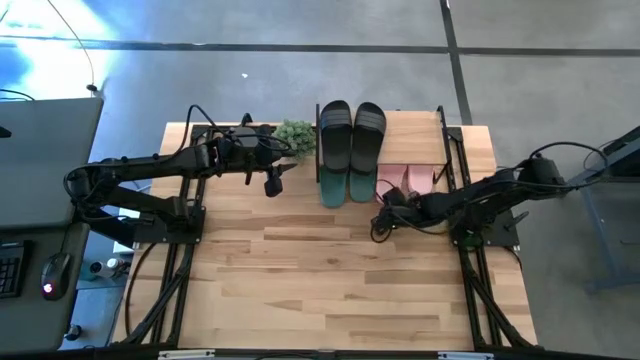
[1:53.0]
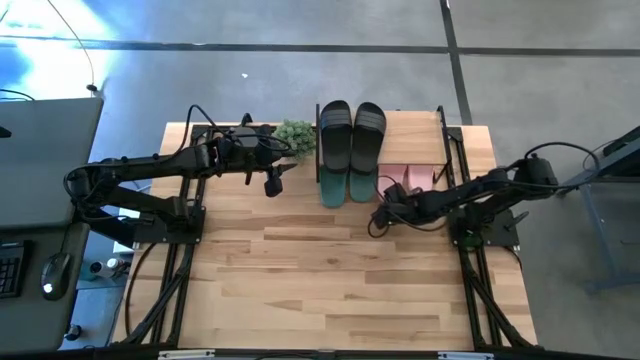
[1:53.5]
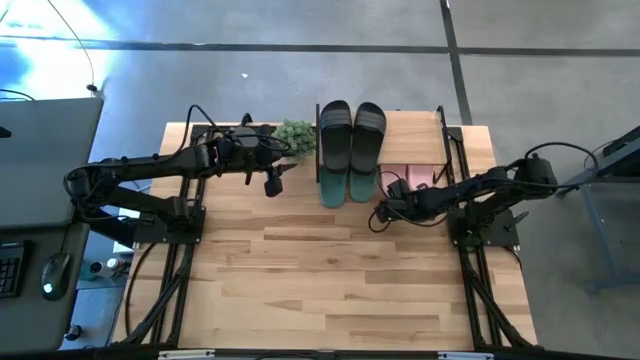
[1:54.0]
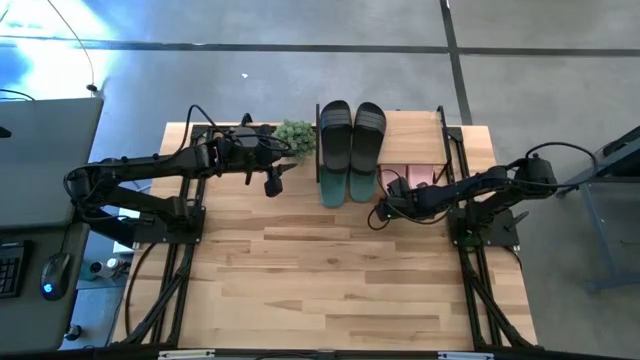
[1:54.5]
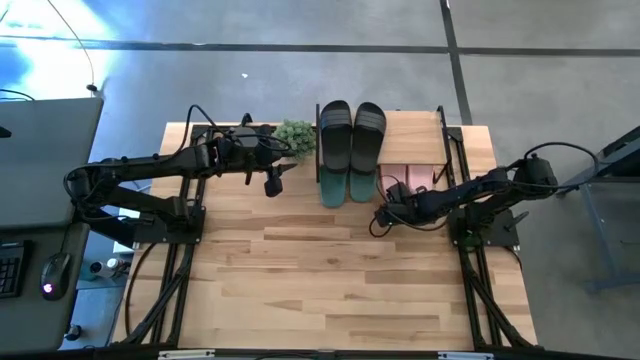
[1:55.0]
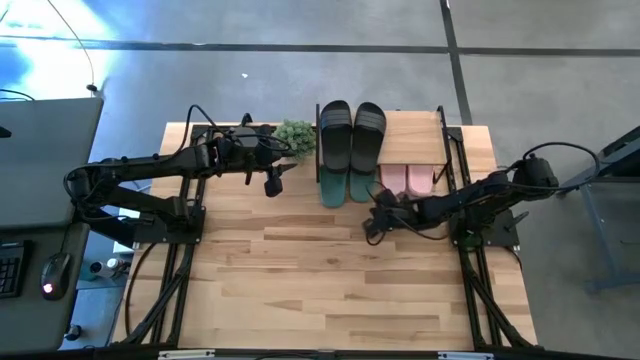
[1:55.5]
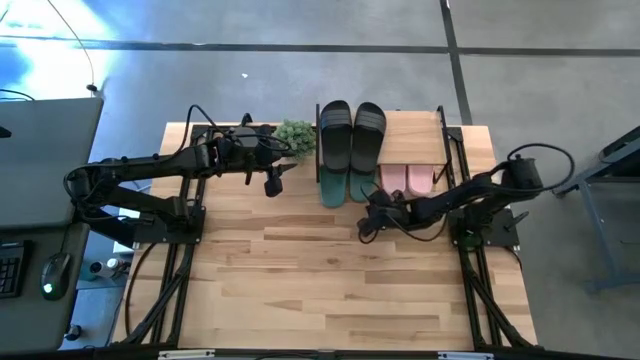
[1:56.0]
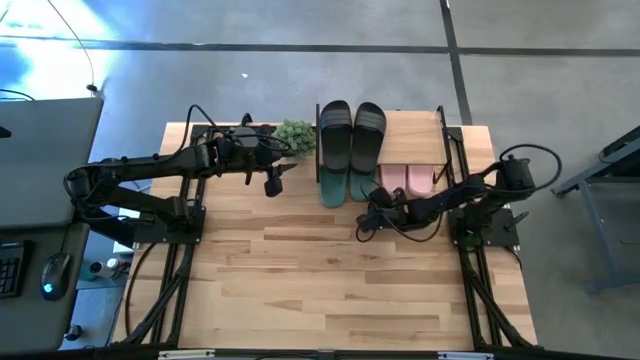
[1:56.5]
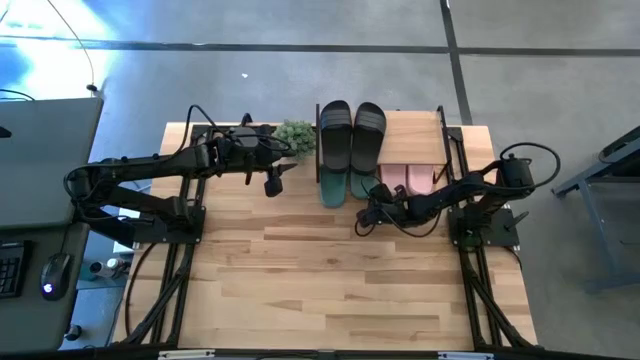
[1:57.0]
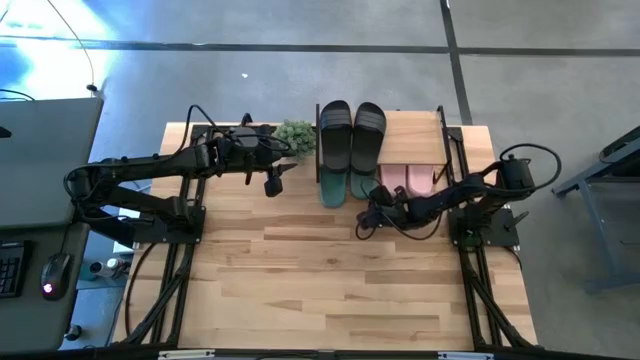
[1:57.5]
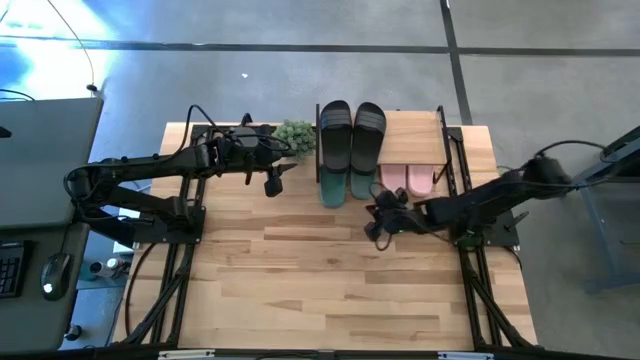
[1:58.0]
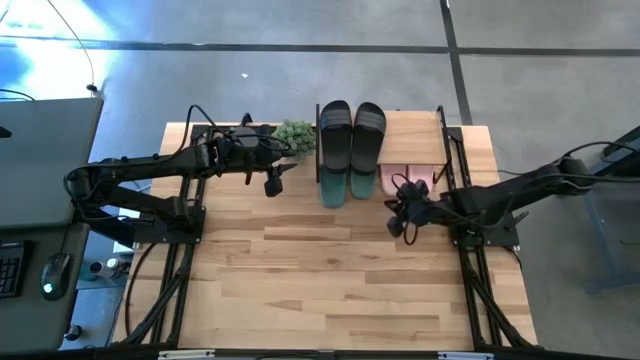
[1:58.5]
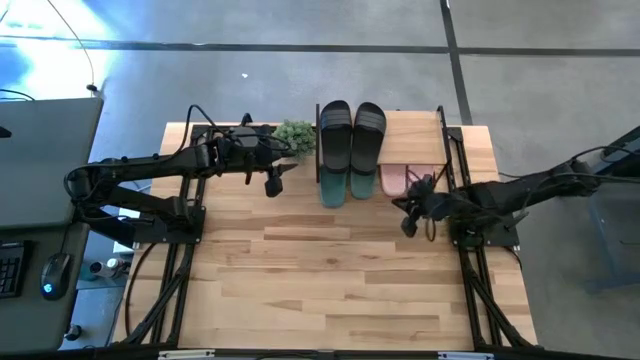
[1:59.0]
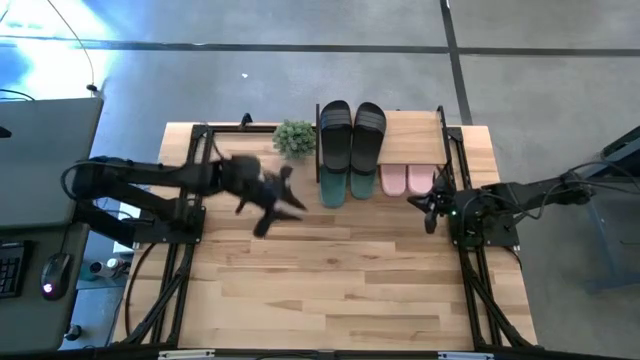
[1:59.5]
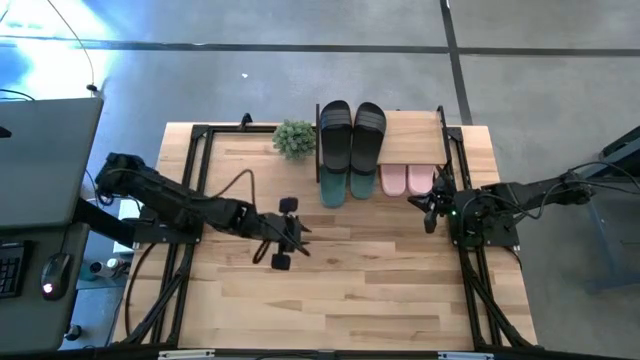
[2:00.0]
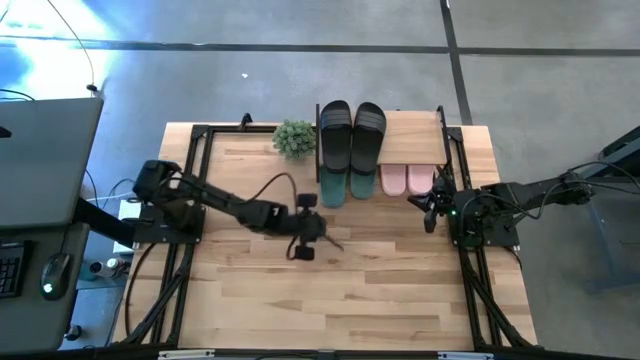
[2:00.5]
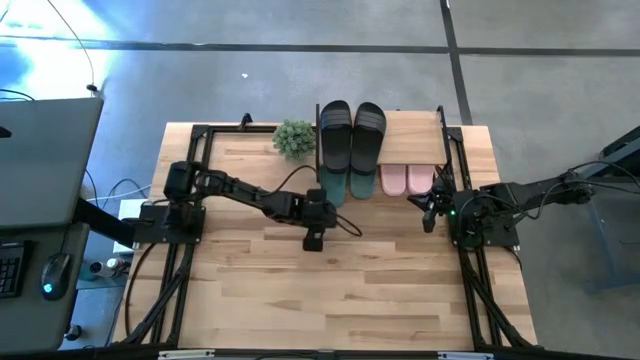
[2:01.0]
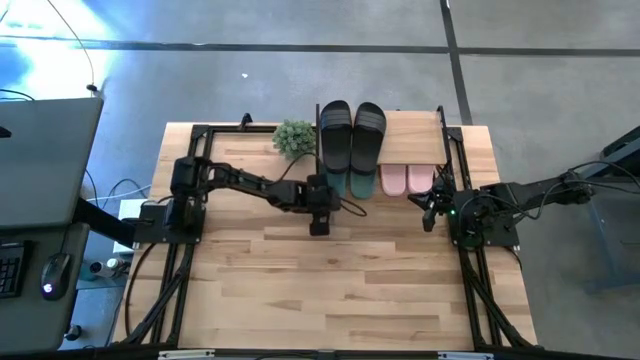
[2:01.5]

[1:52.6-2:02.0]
Task: Pick and place slides into the shelf
Adjust the slides under the shelf

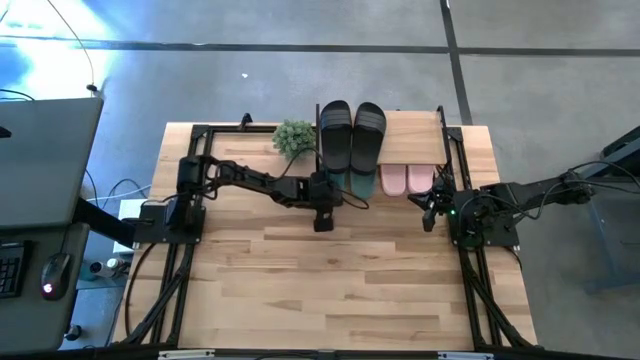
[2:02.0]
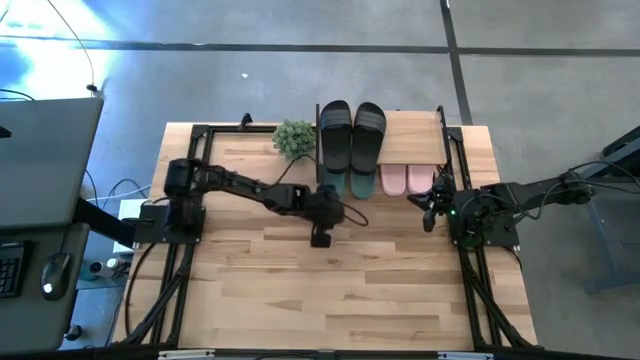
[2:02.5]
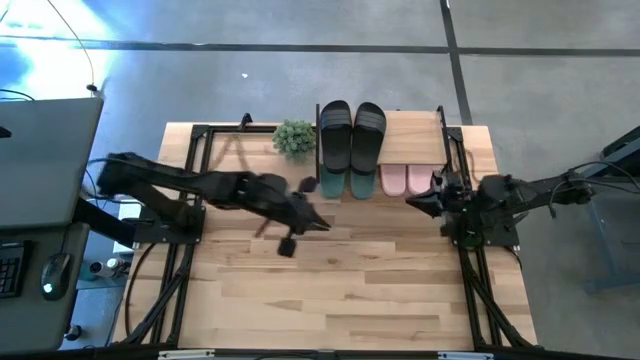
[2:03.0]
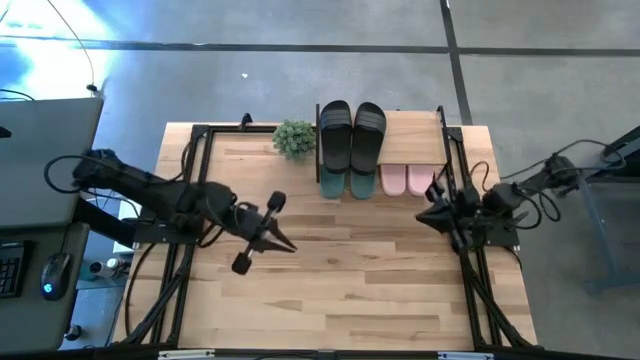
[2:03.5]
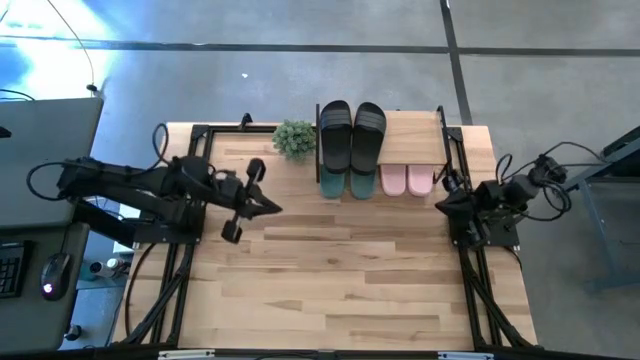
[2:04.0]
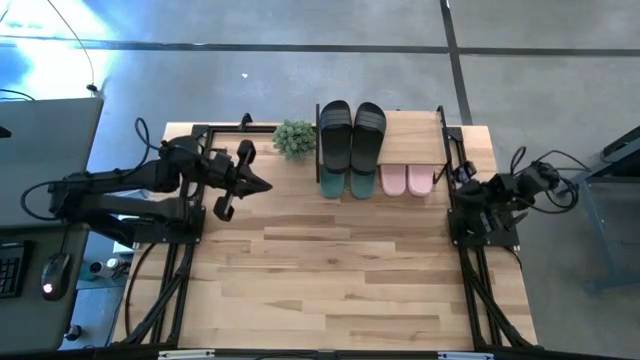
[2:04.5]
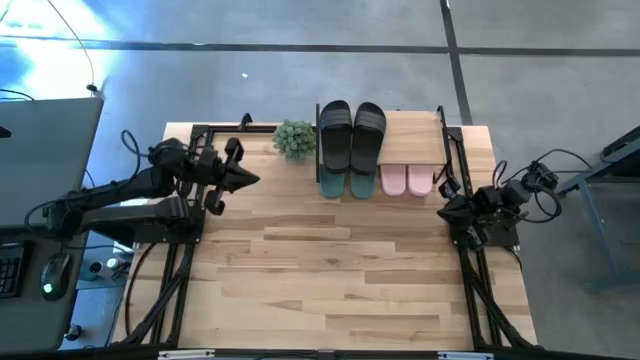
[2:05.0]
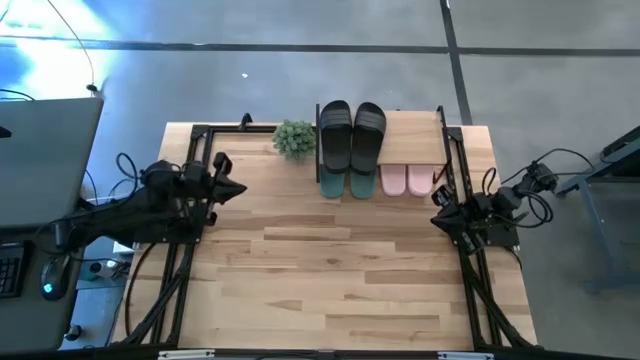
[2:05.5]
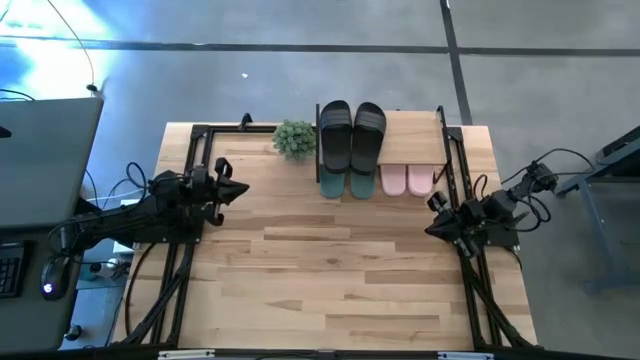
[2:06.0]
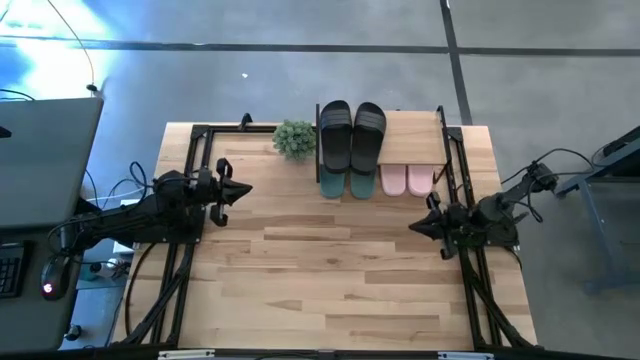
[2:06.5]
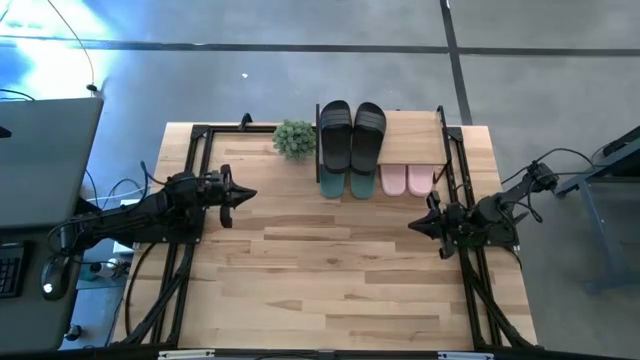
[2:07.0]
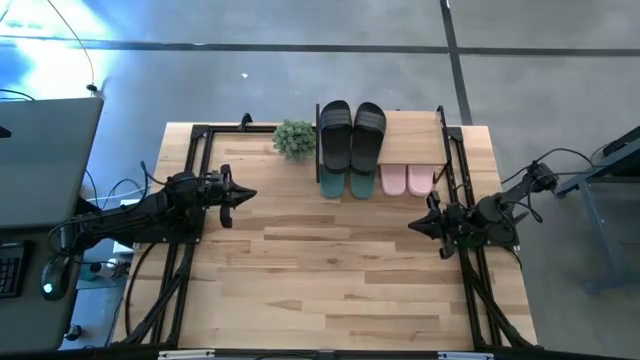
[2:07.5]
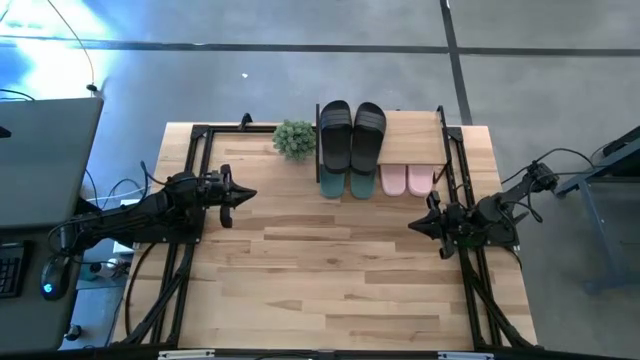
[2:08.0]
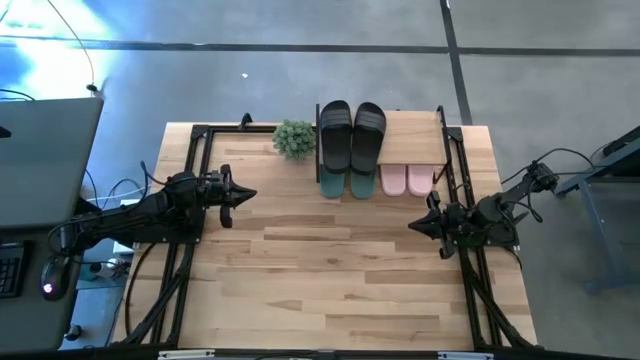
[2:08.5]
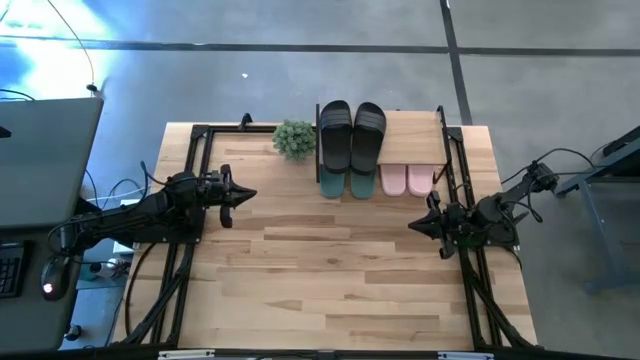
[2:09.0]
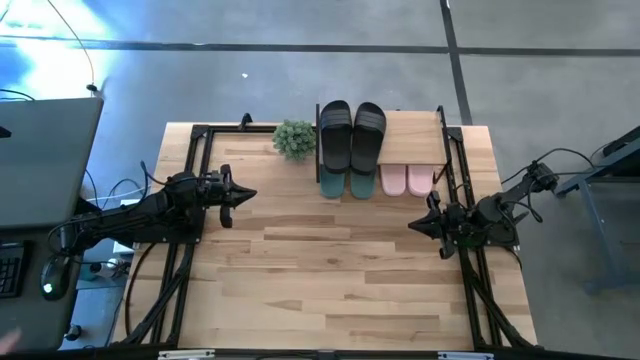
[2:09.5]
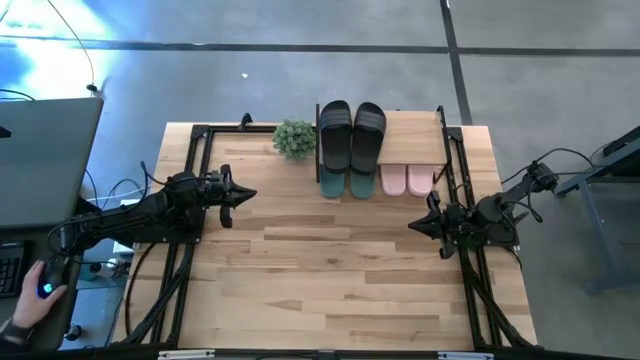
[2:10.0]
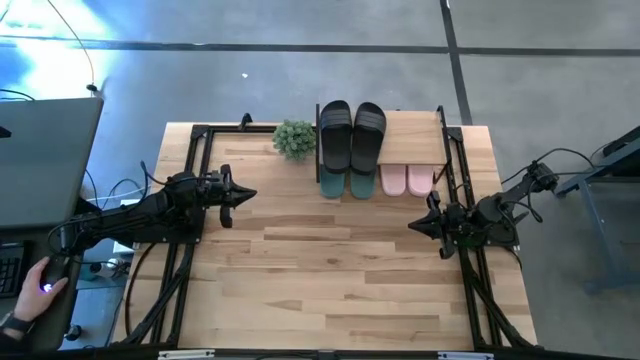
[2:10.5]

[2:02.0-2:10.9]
Return to Home Position

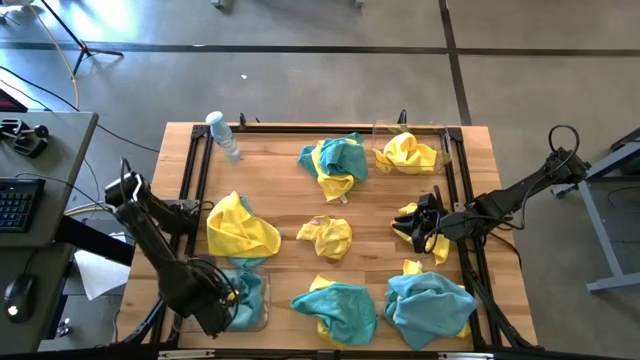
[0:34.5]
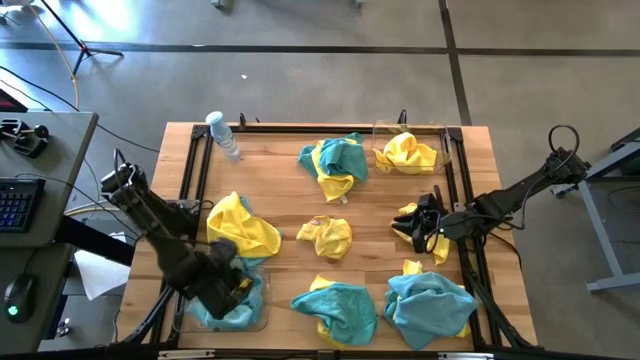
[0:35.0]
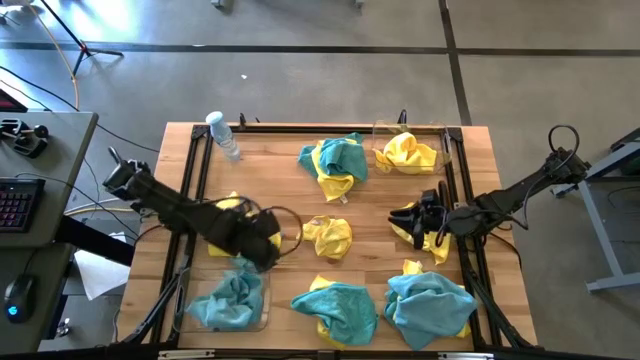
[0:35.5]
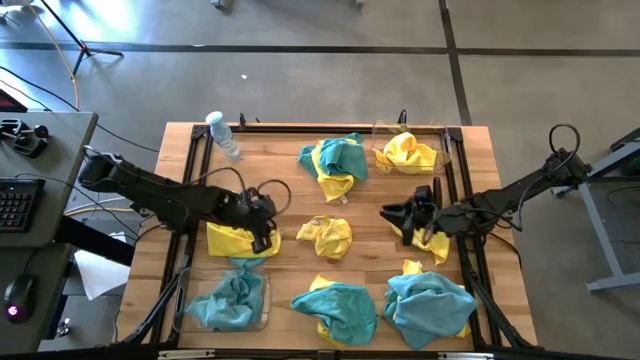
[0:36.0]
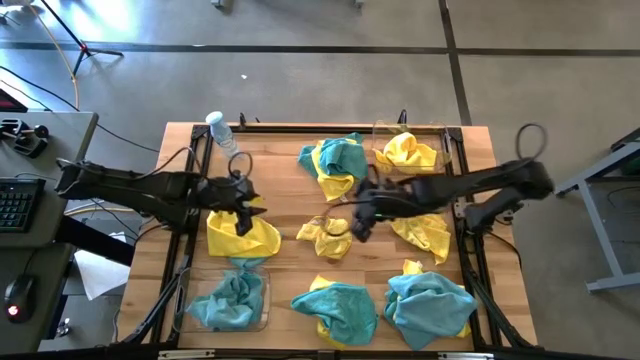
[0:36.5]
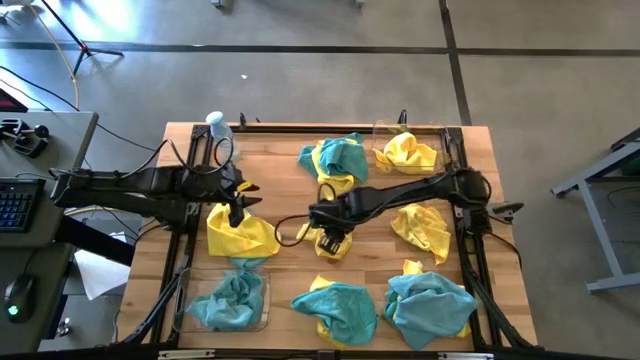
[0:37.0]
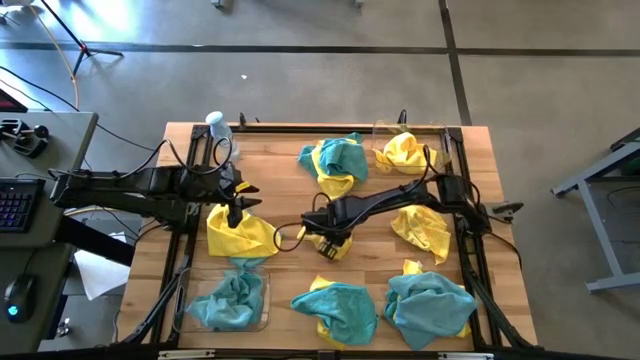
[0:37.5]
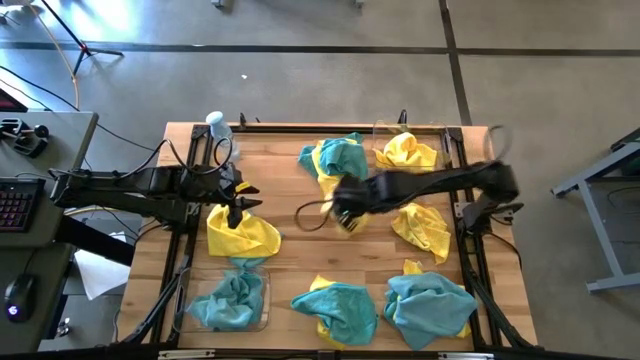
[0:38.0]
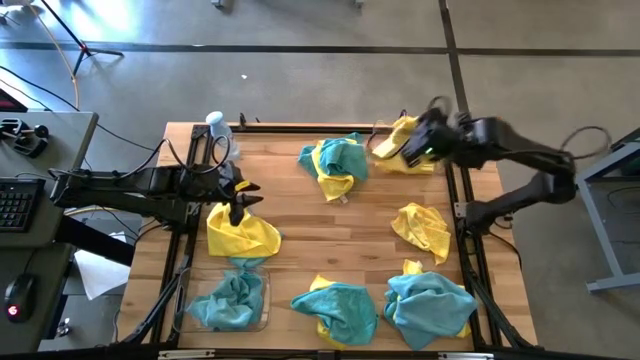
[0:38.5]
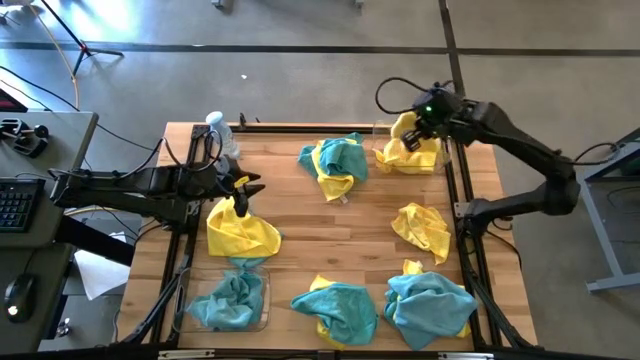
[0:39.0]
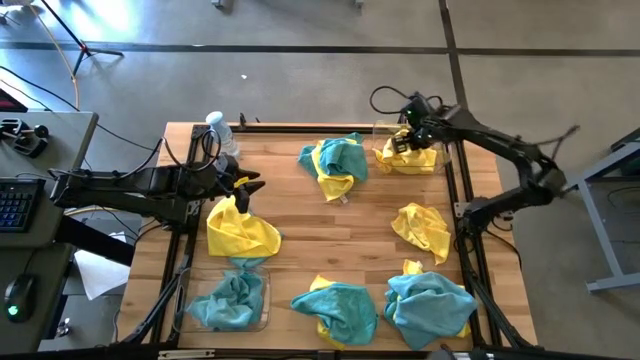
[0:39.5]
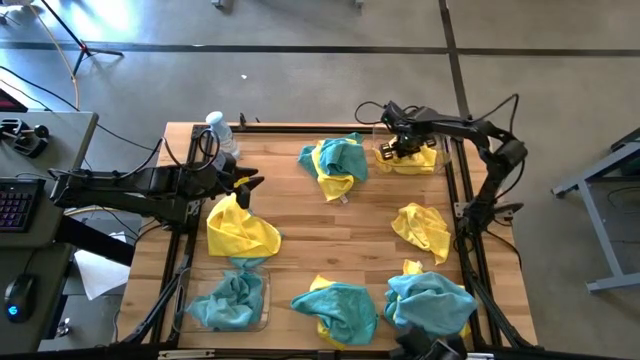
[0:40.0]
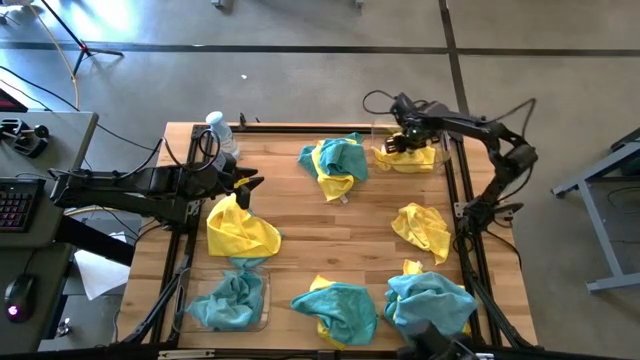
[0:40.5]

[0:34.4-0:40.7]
Task: Sort microfiber towel by color & place in baskets
Put the yellow microfiber towel into the top transparent bin
